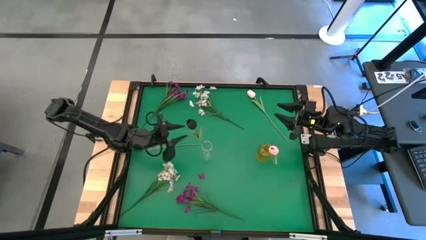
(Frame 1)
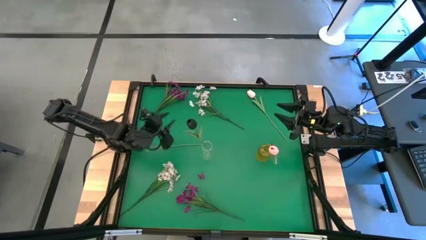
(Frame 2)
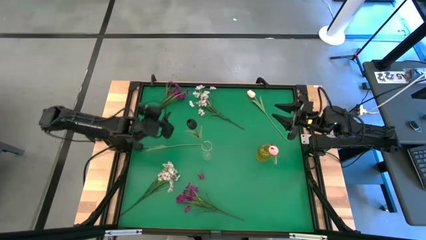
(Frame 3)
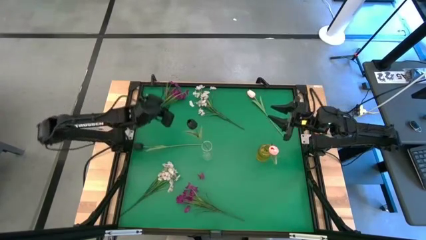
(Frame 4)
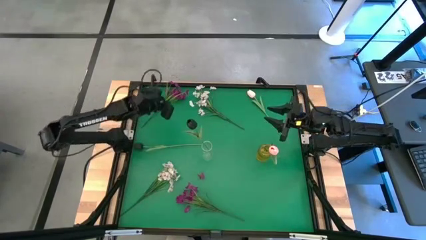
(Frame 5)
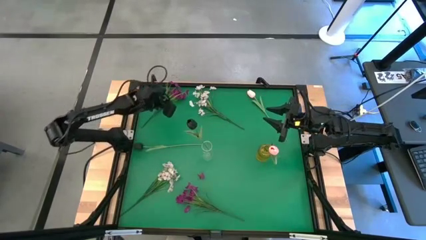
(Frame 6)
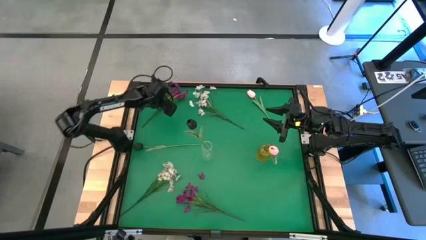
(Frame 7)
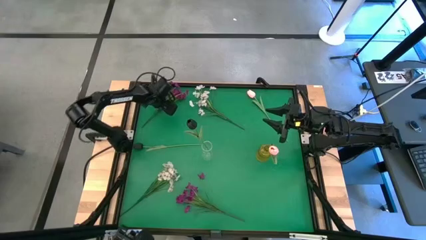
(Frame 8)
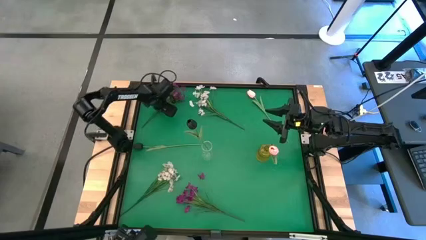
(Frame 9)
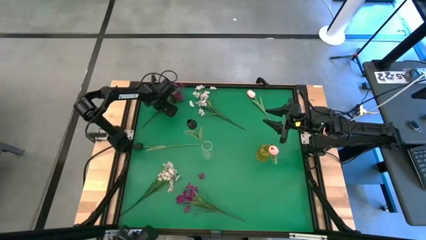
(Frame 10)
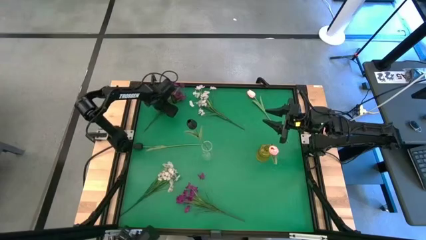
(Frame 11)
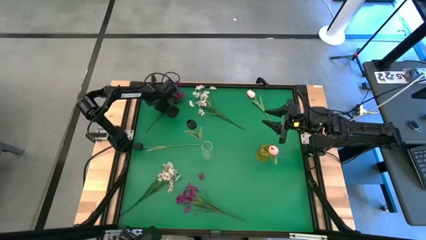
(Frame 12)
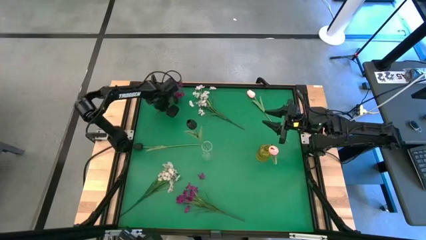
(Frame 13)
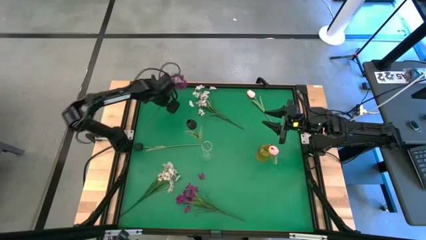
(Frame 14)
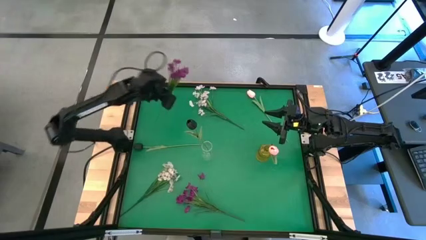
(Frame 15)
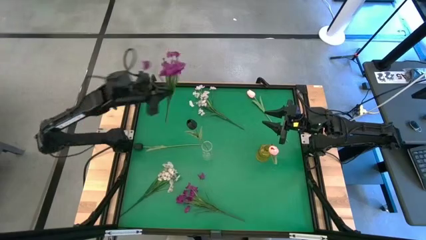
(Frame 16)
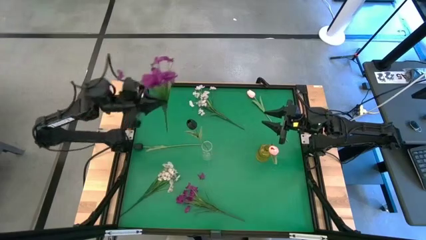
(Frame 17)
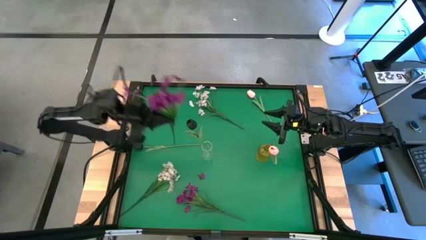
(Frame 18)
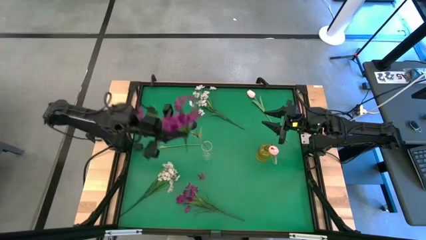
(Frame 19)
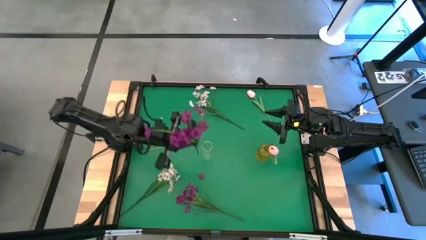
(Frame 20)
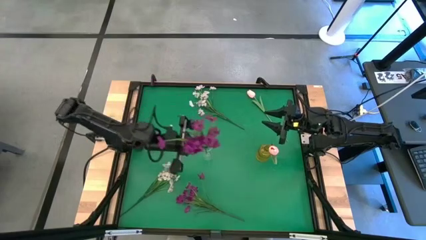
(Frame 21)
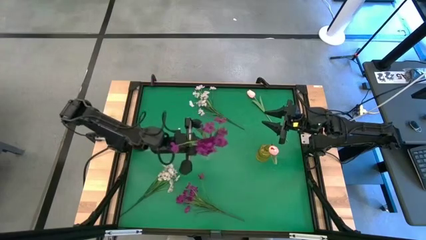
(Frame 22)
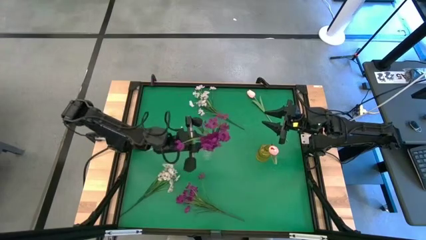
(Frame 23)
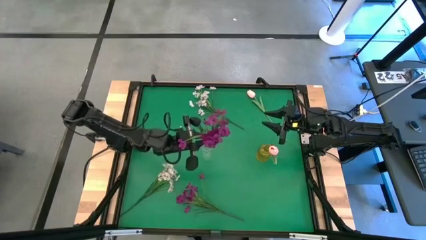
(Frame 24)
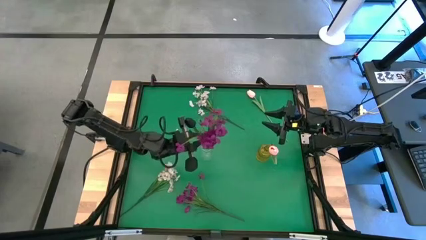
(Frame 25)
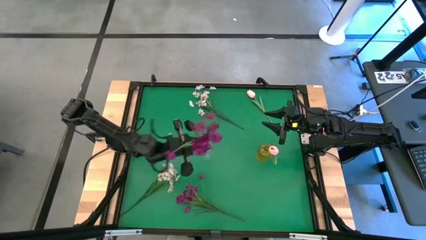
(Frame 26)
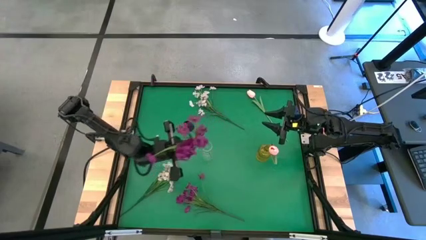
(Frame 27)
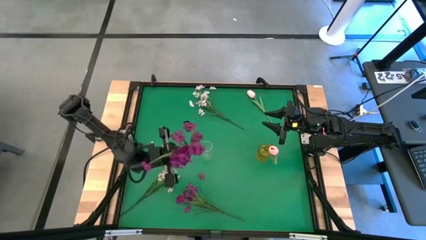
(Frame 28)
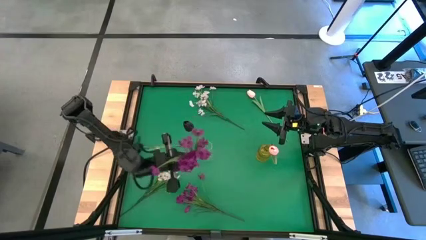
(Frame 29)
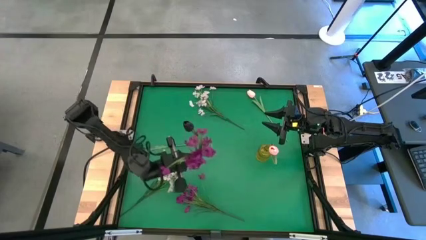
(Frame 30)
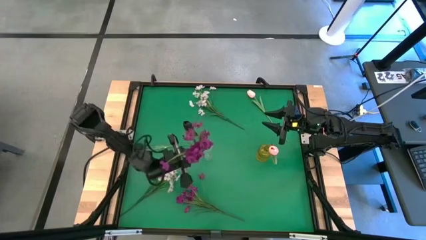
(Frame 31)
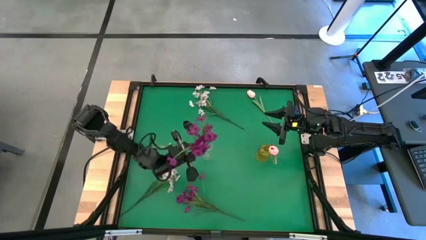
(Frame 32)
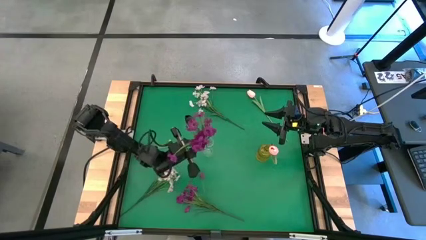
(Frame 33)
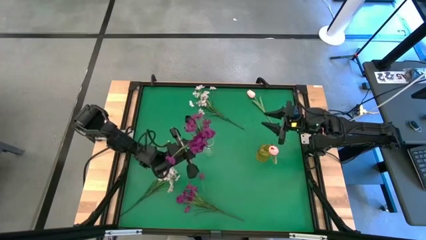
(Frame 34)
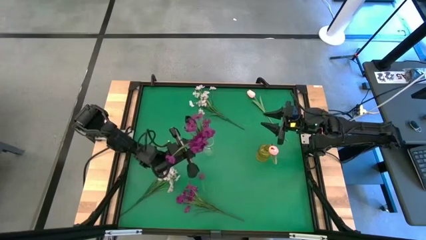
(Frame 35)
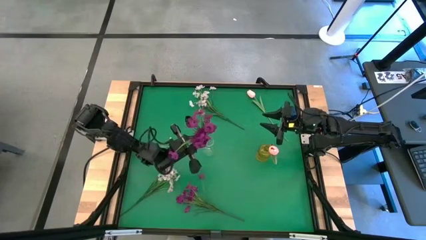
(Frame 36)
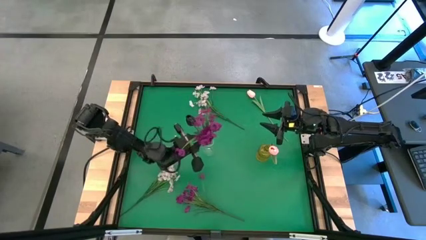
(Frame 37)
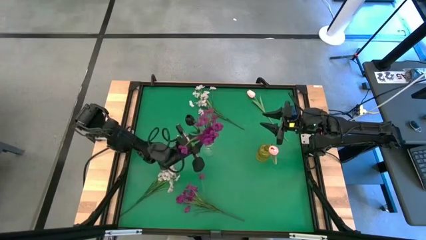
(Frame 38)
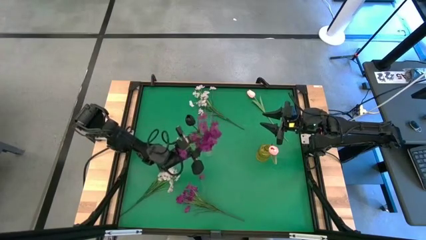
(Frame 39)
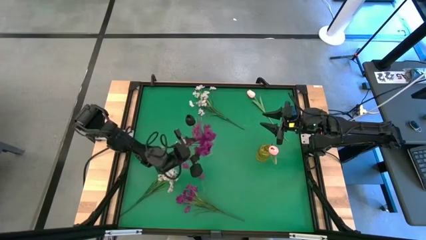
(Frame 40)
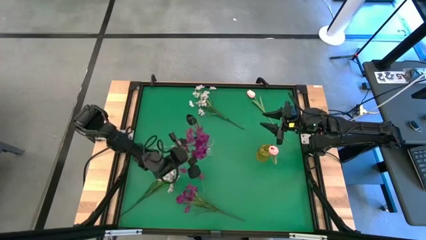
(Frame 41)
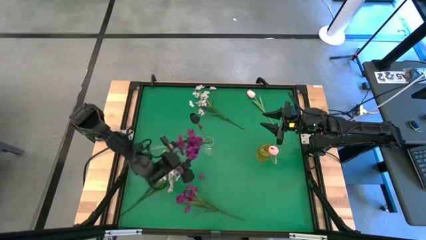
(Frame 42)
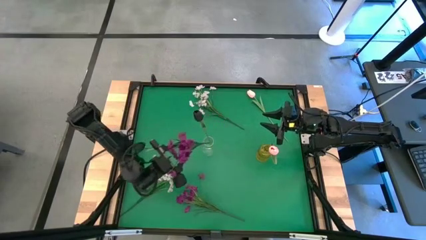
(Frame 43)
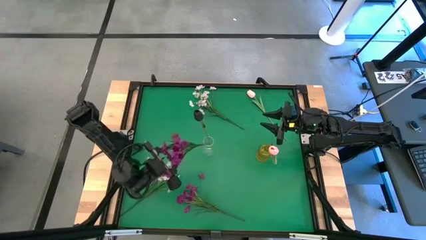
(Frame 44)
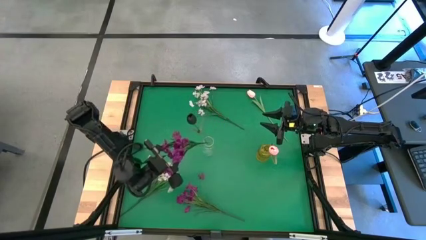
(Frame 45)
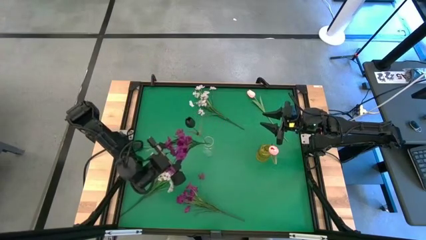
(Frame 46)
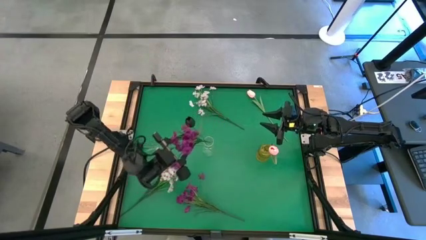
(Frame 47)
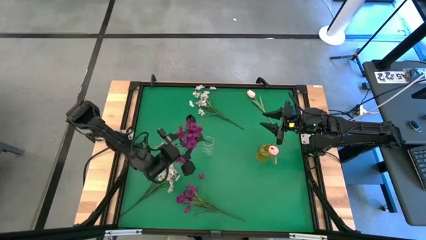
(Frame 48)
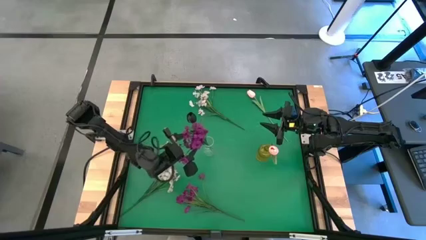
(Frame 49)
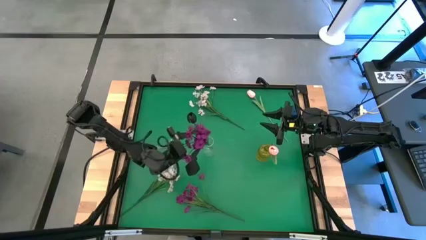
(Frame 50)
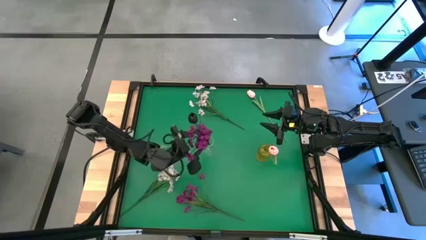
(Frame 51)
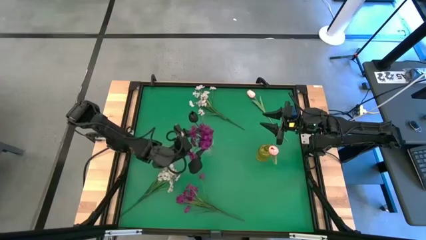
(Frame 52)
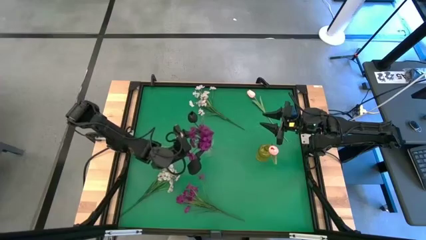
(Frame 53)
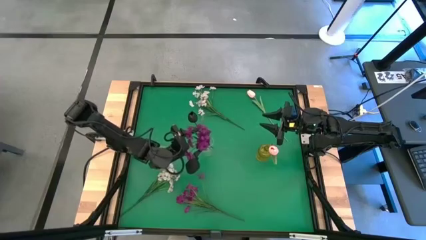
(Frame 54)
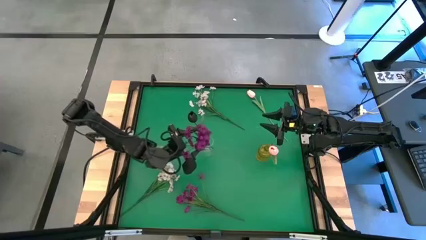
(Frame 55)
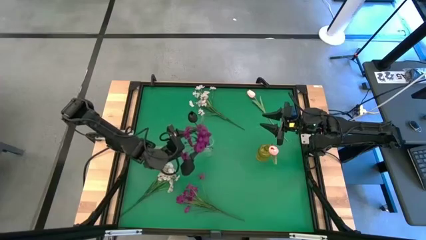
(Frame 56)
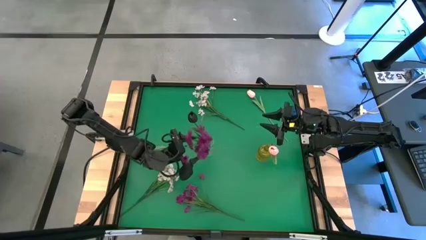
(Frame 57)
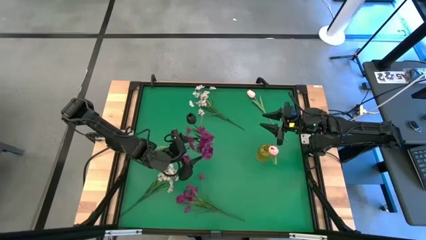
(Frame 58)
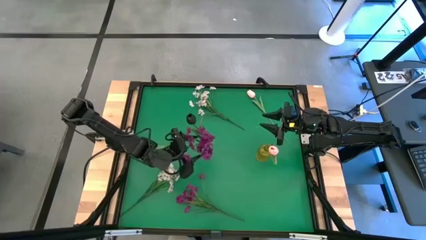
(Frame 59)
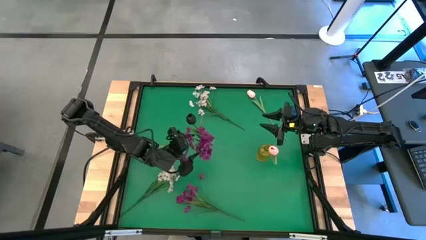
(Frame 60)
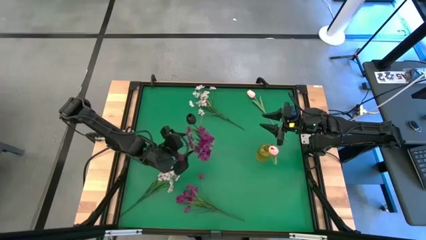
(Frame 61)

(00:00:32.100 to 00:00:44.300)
Task: Sort flowers into vase by color
Put the top violet flower into the transparent vase
